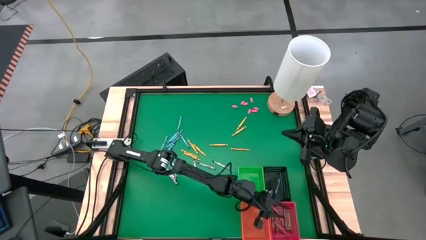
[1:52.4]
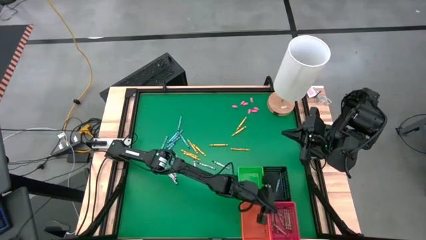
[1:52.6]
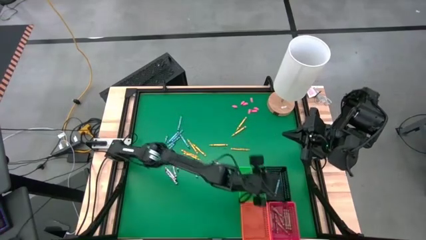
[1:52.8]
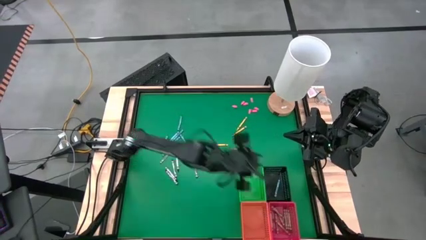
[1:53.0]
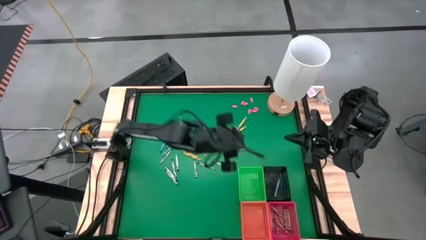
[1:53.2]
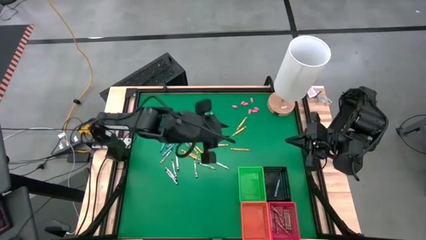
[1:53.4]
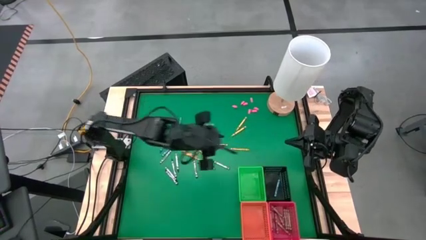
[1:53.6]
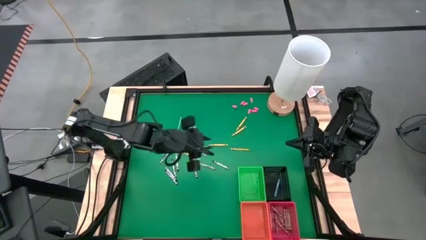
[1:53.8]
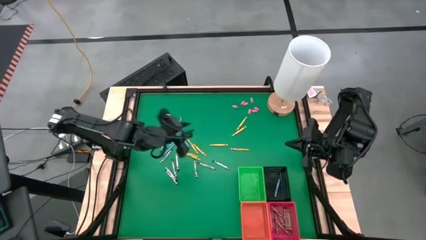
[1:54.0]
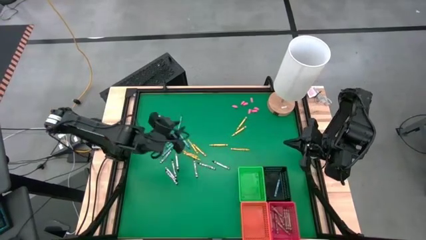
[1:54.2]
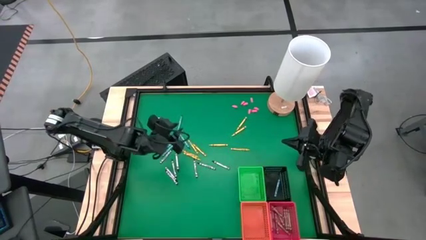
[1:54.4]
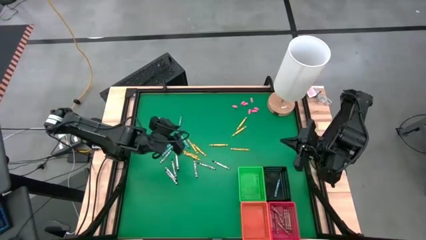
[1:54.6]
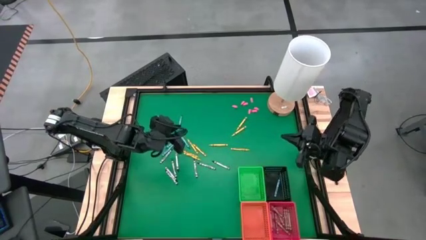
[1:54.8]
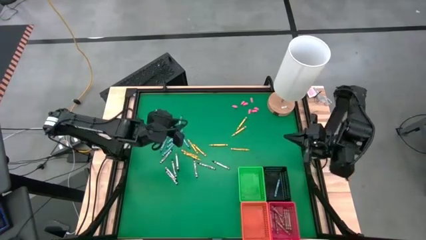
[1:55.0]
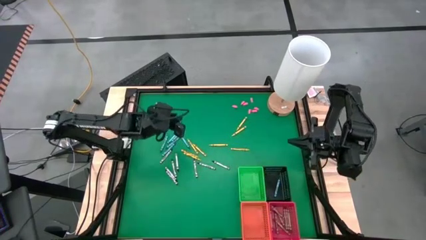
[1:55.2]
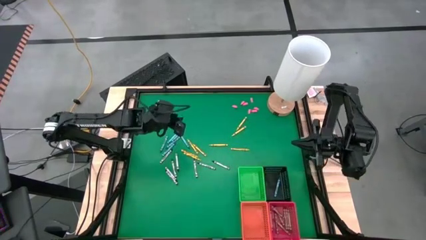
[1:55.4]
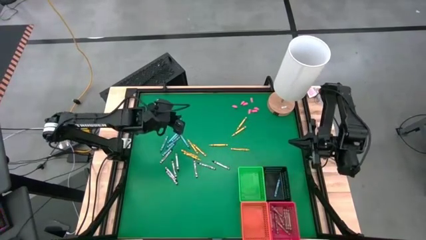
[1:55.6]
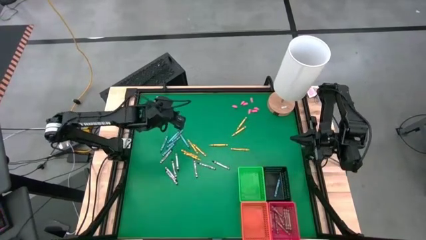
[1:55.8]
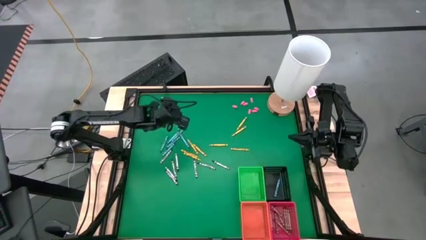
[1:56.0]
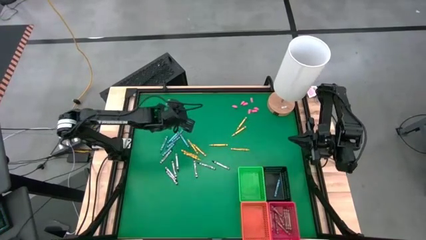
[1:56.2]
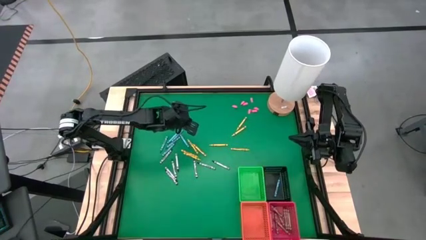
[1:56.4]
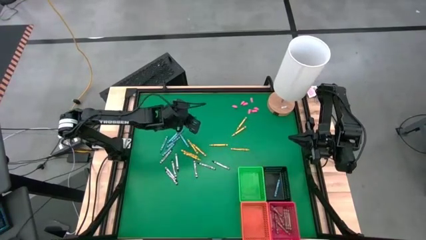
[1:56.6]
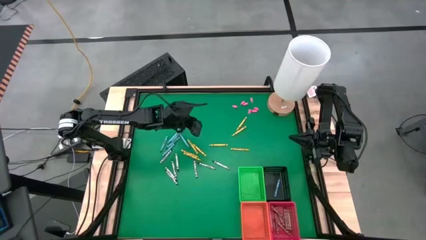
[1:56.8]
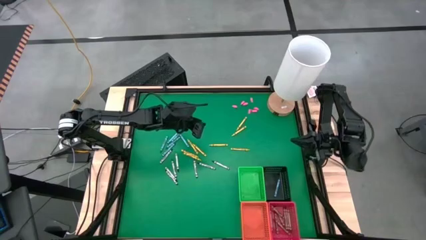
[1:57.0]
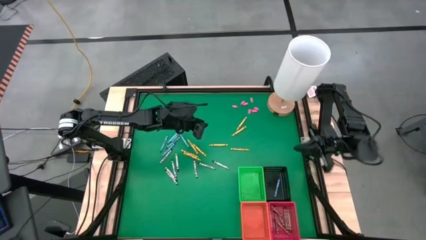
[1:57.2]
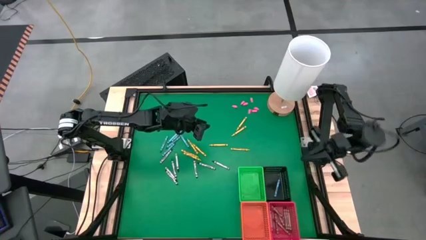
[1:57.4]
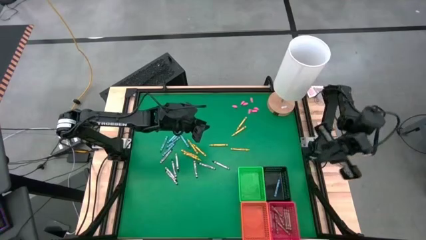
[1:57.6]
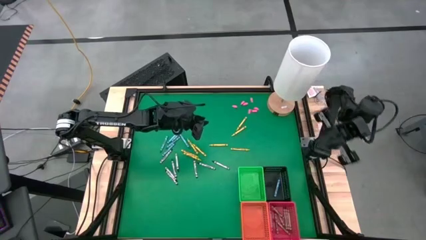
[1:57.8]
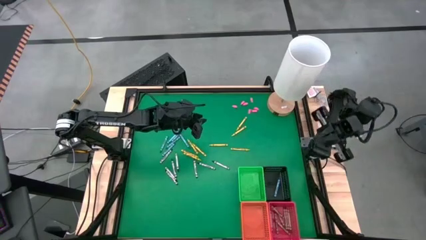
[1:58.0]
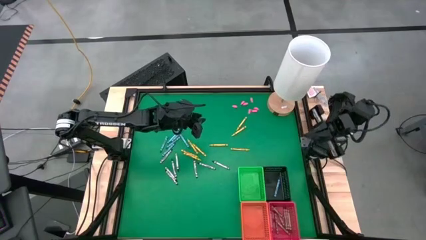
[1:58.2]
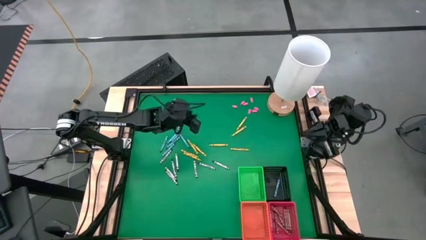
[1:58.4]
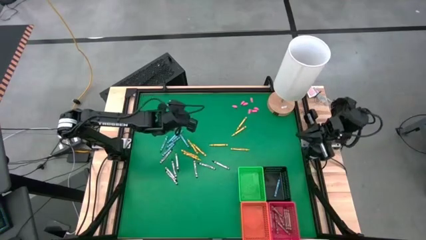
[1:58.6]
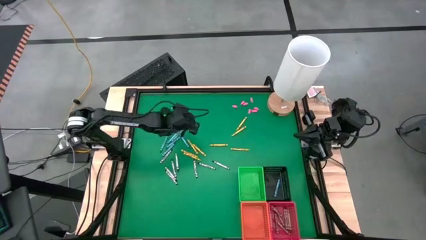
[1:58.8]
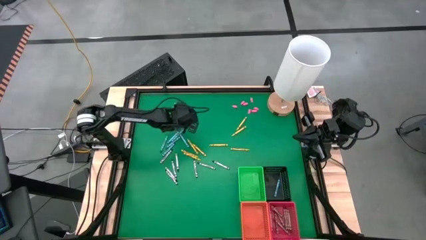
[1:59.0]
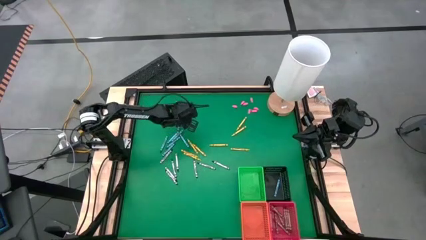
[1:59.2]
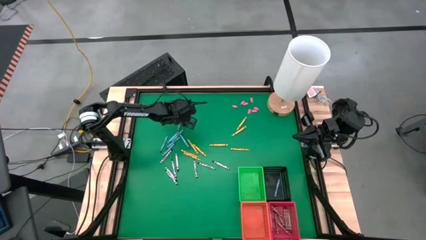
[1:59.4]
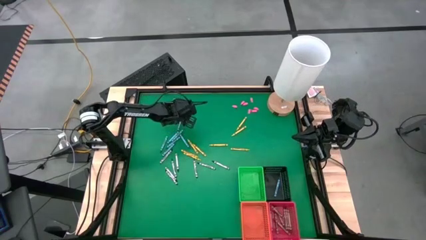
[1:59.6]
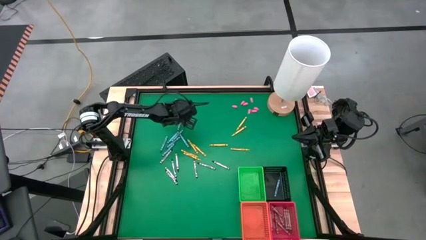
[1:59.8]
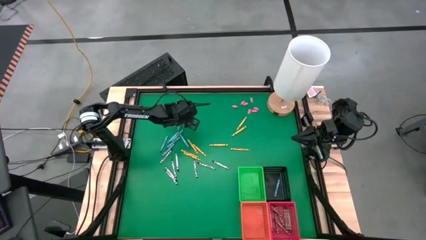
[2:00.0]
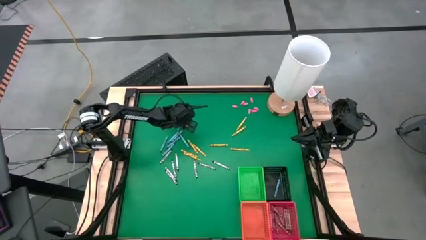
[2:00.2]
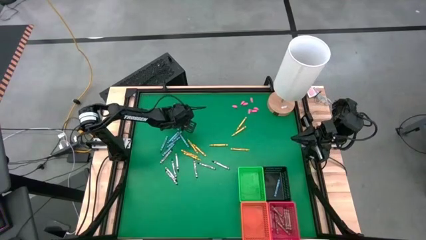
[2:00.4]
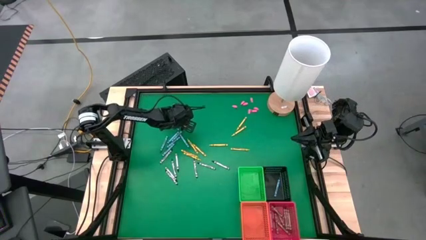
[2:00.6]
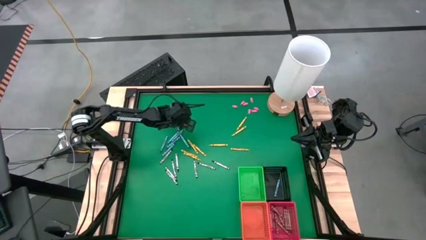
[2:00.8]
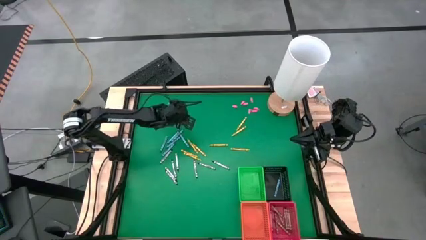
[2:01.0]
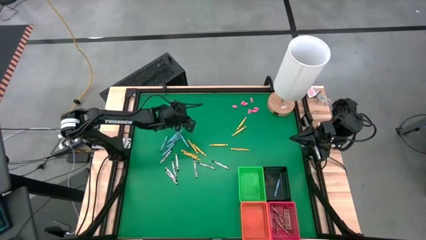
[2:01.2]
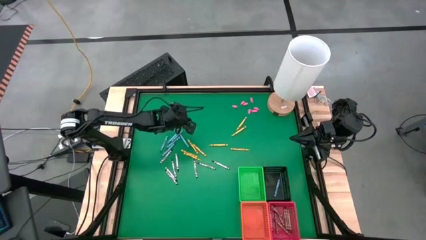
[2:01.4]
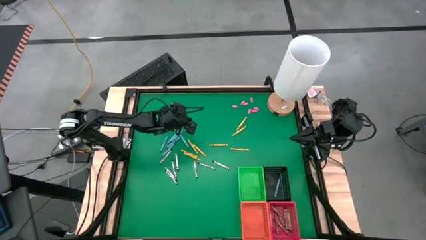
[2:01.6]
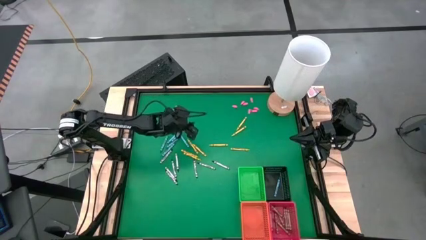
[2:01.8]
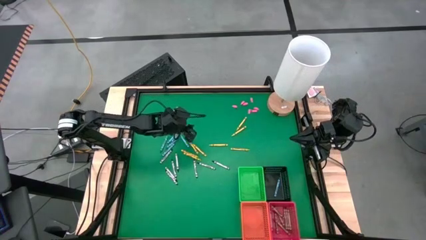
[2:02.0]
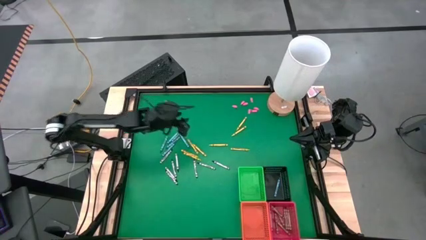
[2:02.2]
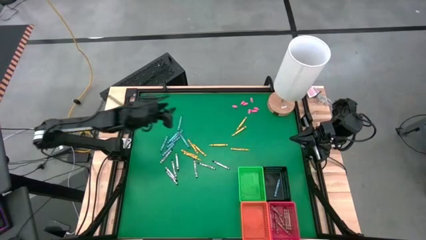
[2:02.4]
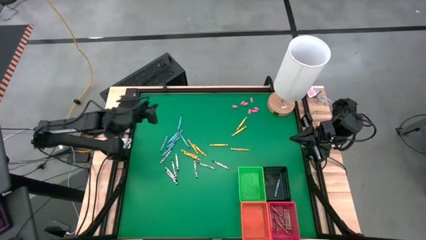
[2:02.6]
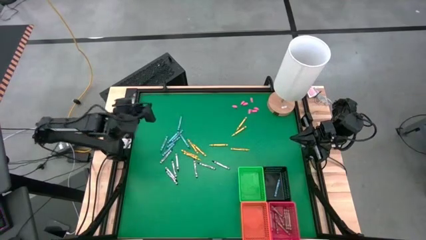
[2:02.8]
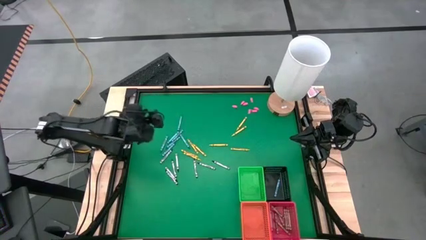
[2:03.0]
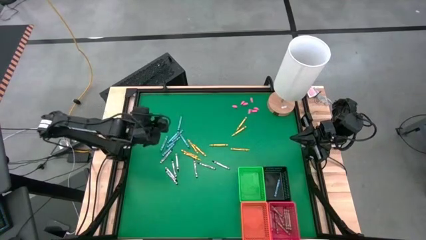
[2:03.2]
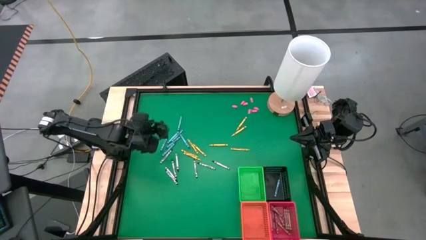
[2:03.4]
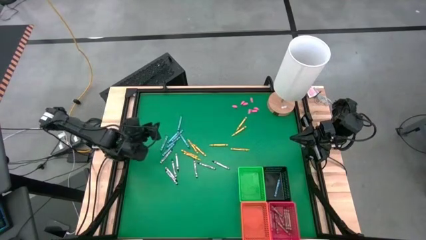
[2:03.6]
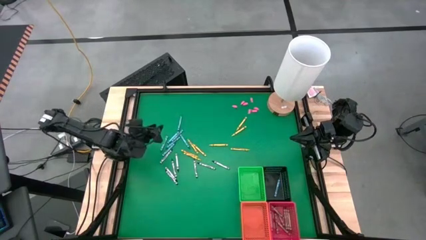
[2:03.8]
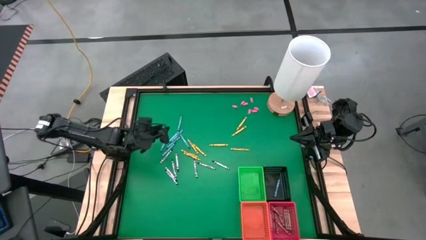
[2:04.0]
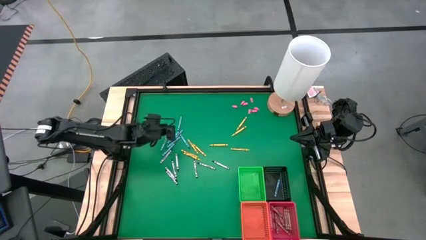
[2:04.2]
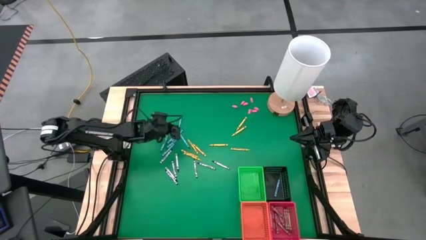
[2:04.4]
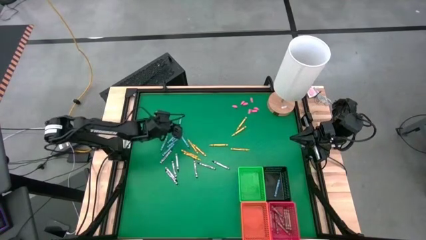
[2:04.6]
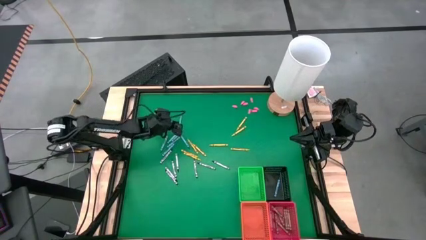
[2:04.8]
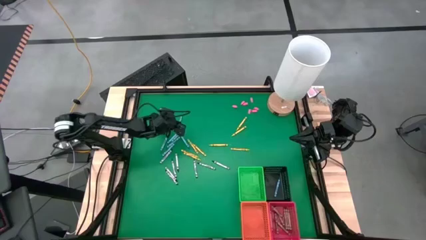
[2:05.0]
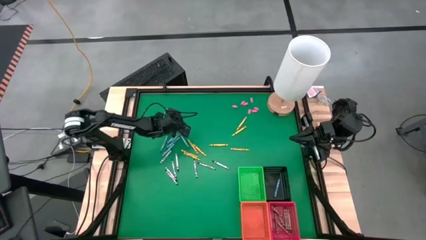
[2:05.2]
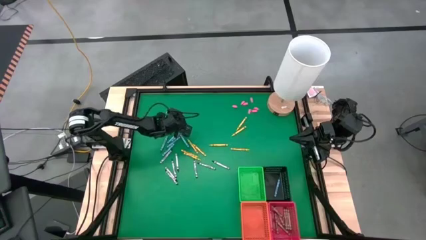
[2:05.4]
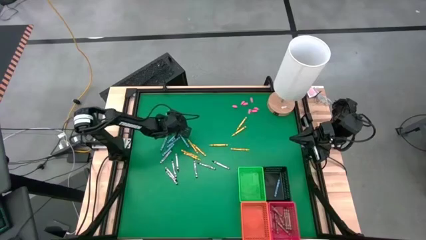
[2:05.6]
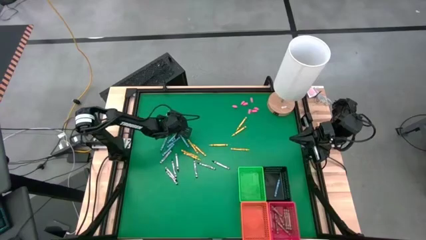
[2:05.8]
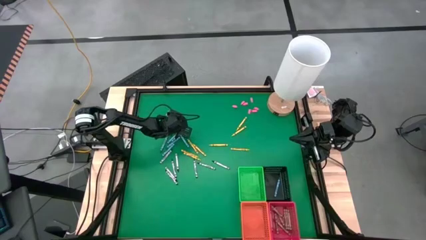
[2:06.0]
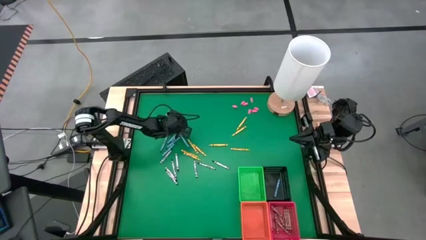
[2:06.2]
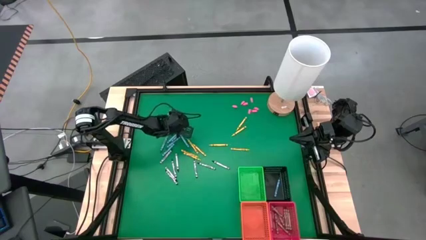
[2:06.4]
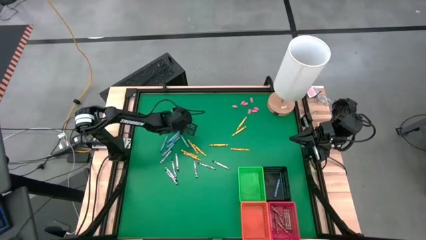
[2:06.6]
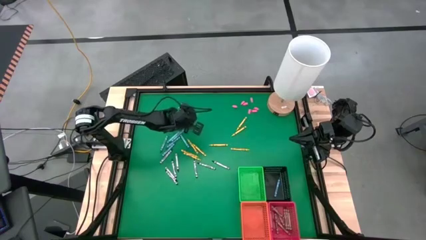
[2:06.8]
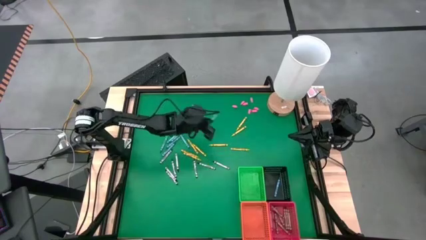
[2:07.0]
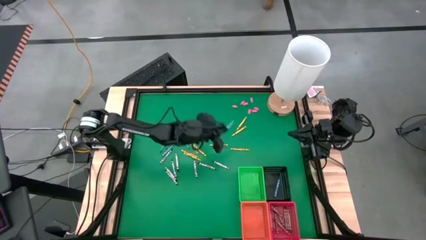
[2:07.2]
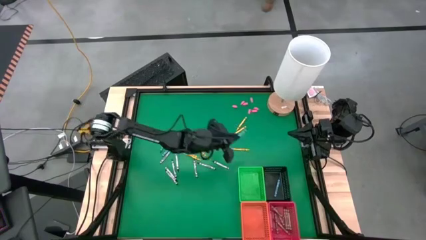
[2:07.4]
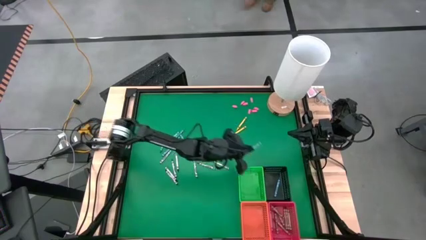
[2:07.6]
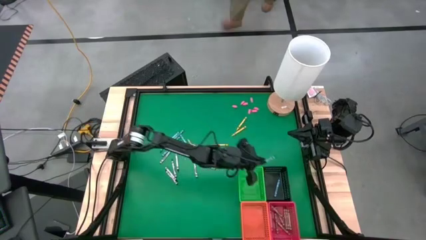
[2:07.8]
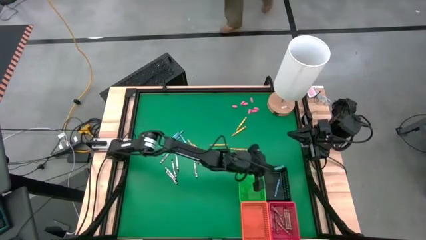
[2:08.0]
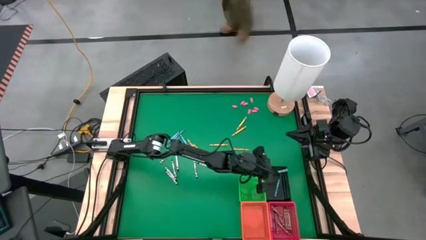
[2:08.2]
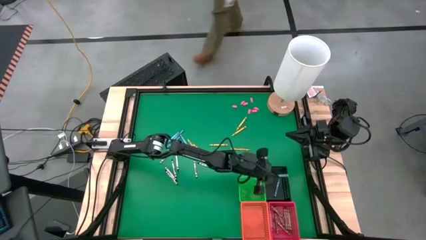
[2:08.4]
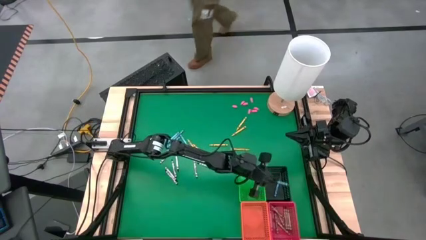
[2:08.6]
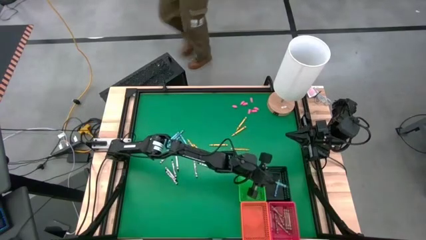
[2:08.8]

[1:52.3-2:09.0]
Task: Sort crayons
Put the blue crayon into the black bin

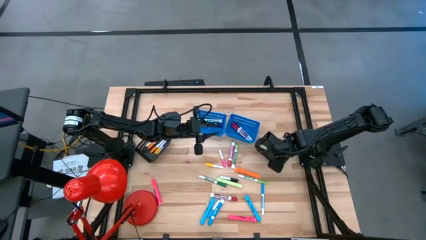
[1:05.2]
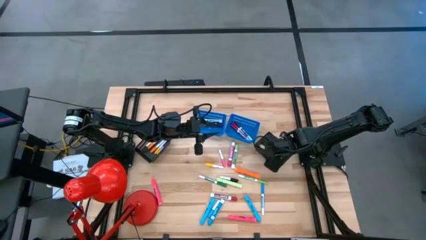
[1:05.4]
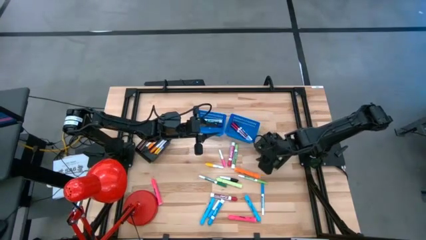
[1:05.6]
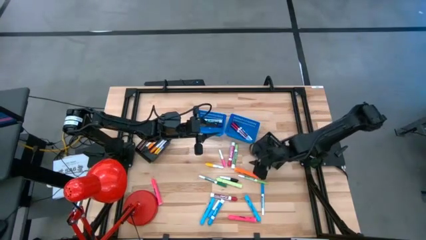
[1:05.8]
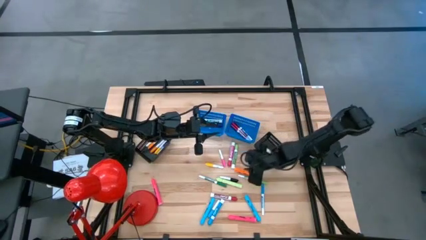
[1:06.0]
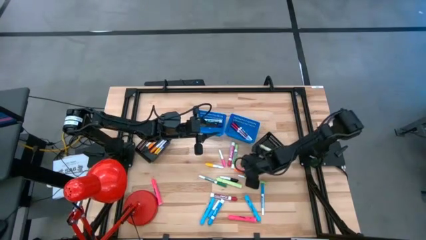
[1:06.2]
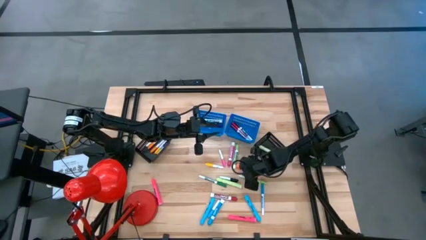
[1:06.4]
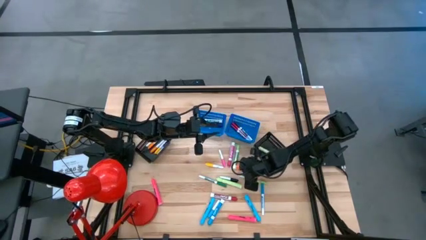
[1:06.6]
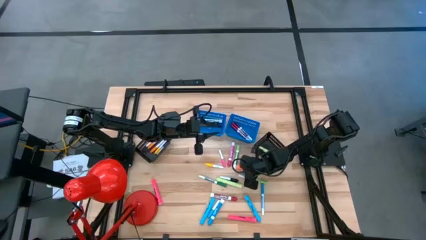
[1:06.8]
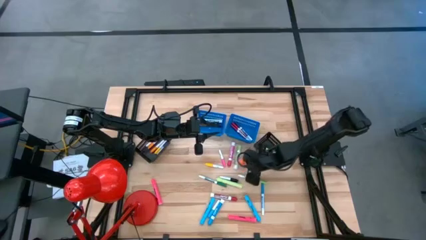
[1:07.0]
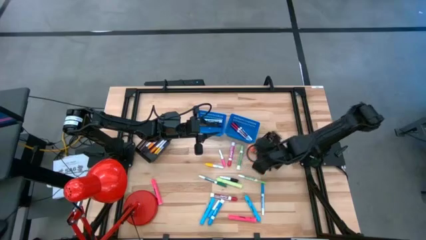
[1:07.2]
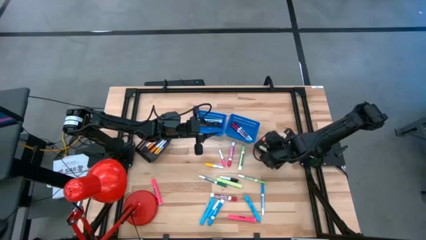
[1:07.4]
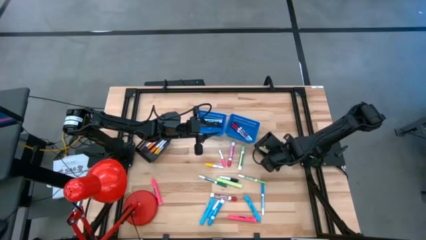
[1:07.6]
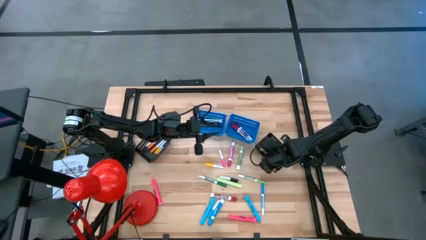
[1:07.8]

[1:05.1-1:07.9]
Task: Pick & Place Markers
Put the orange highlighter into the right black bin
